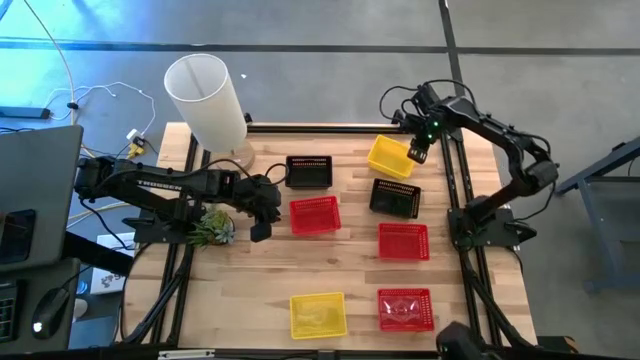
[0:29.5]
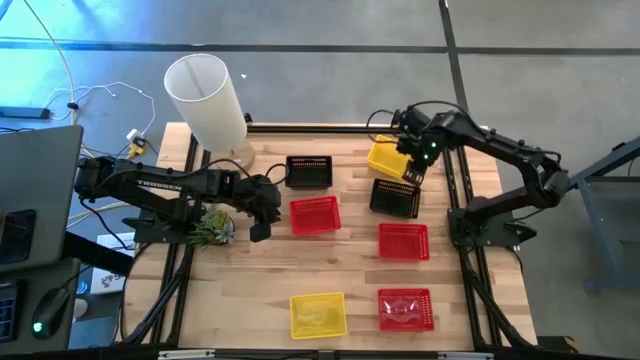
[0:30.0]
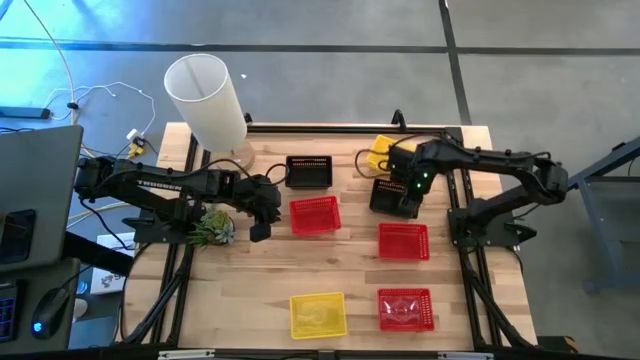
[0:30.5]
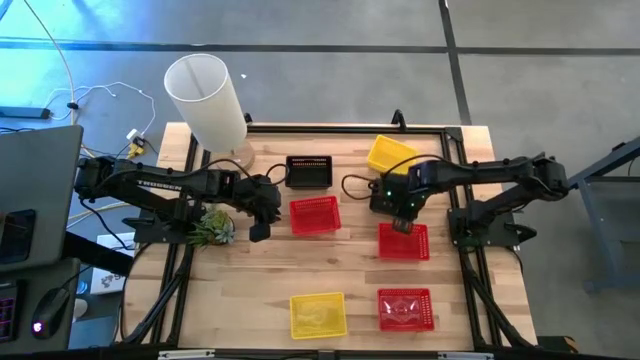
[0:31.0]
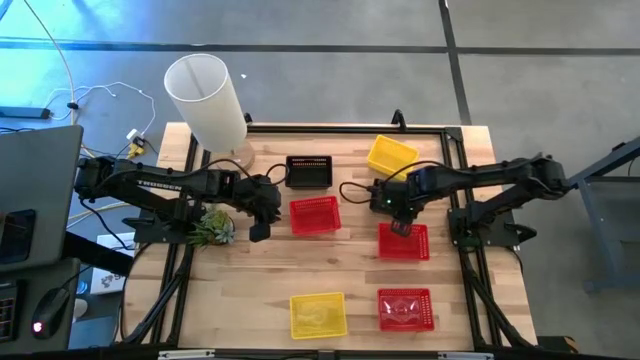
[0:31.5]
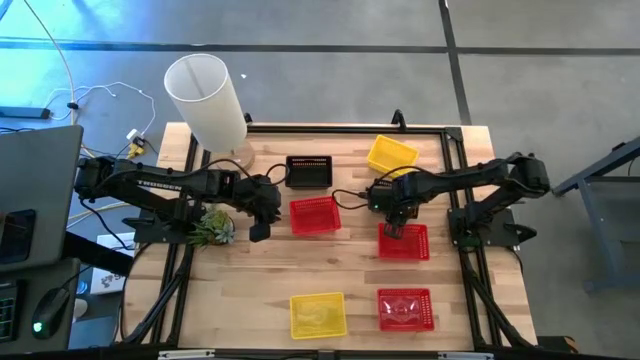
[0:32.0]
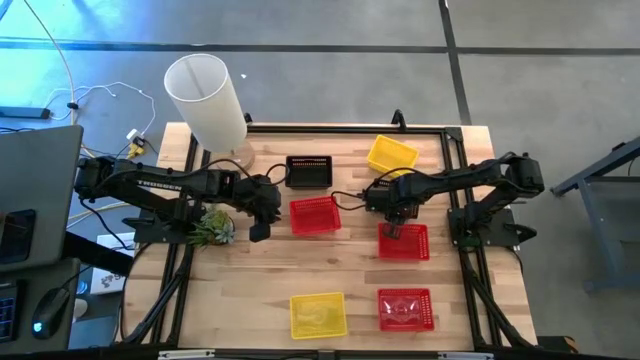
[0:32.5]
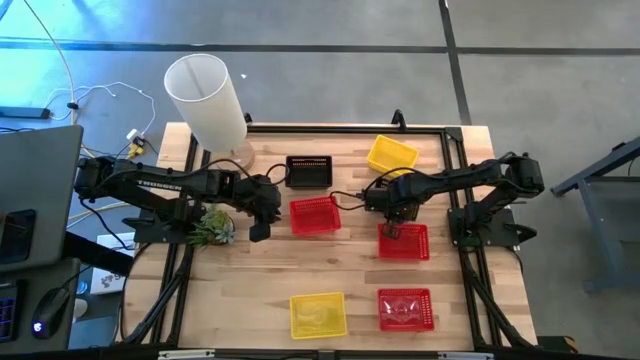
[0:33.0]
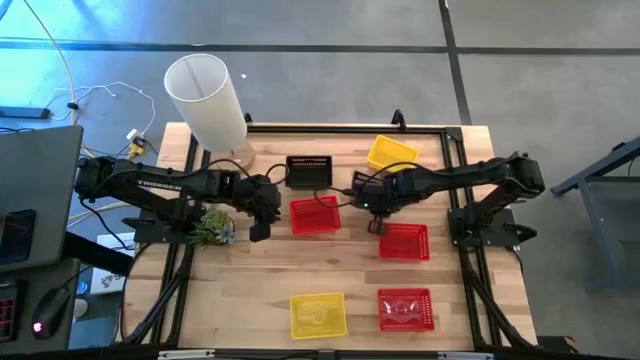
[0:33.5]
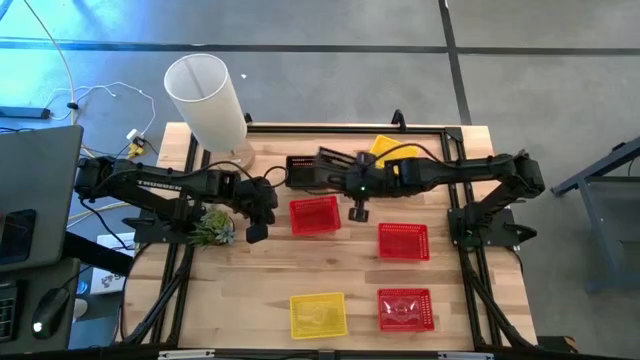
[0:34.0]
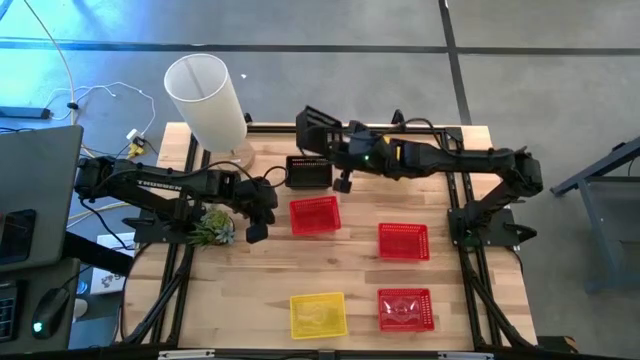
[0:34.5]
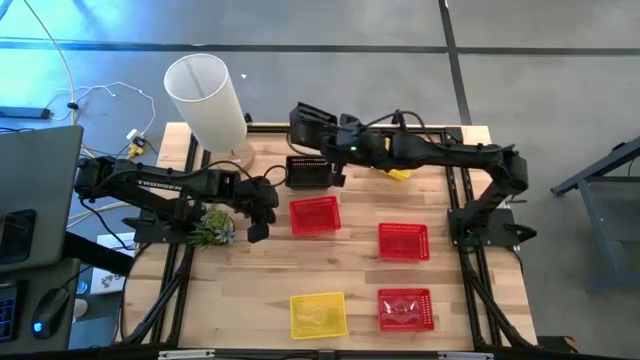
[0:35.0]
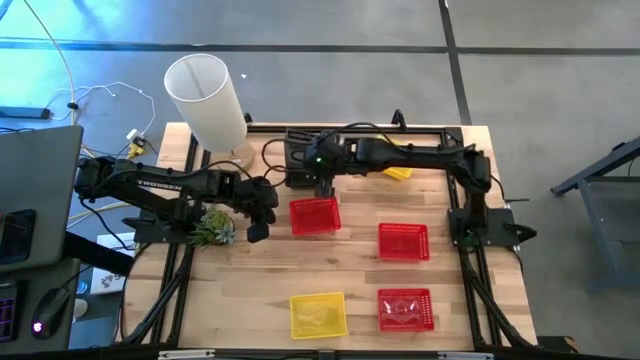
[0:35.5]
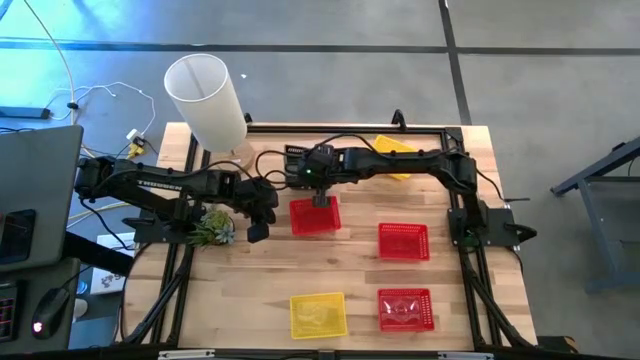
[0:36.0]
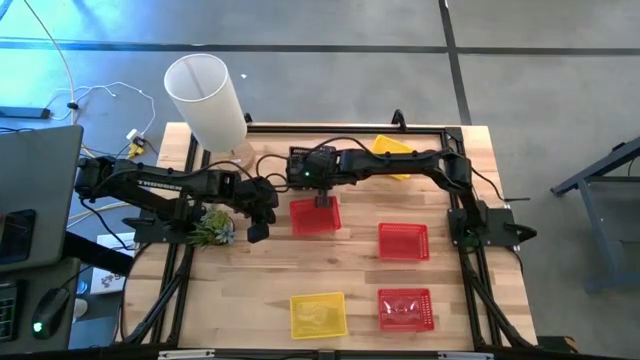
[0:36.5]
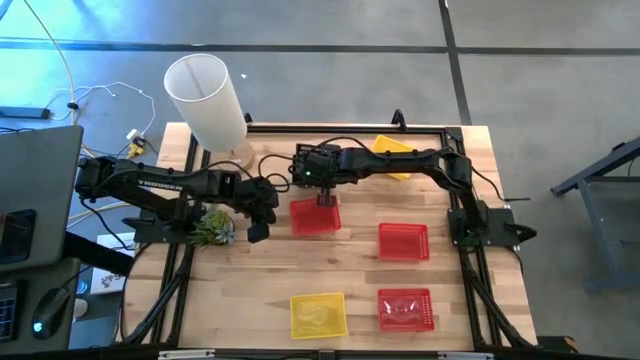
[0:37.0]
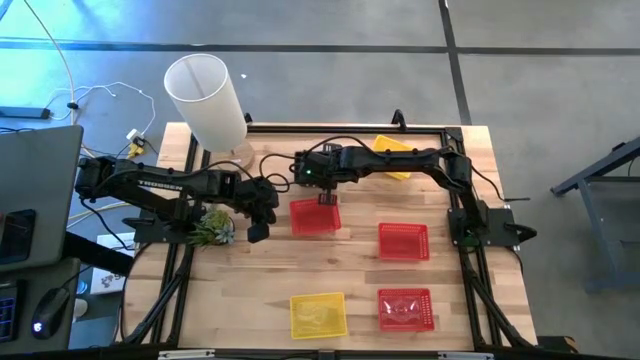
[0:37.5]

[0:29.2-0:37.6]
Stack the bottom black bin on top of the top black bin

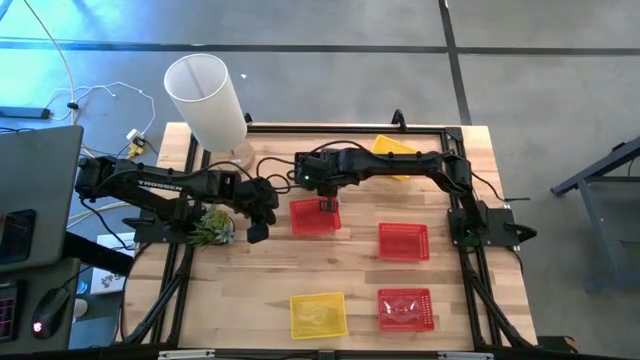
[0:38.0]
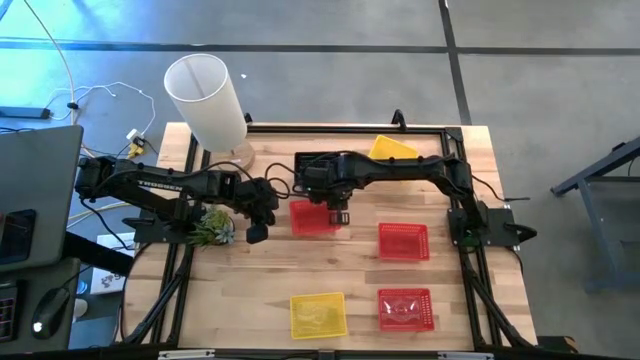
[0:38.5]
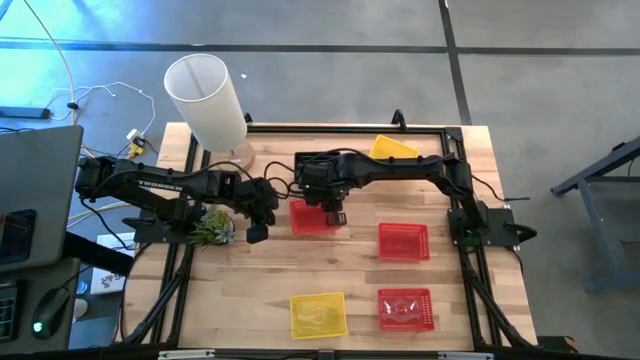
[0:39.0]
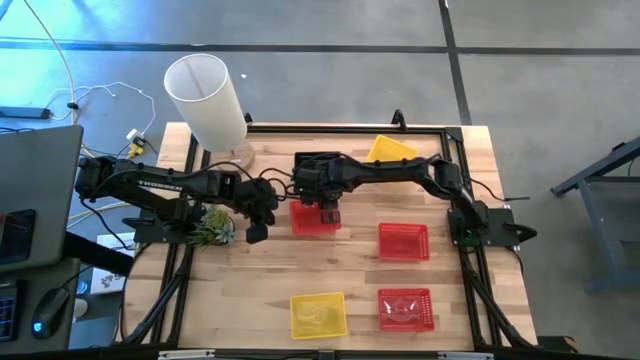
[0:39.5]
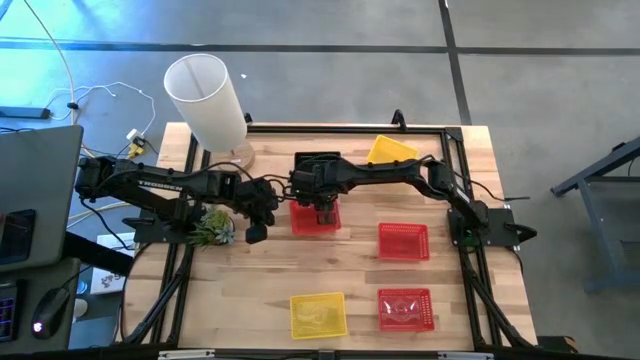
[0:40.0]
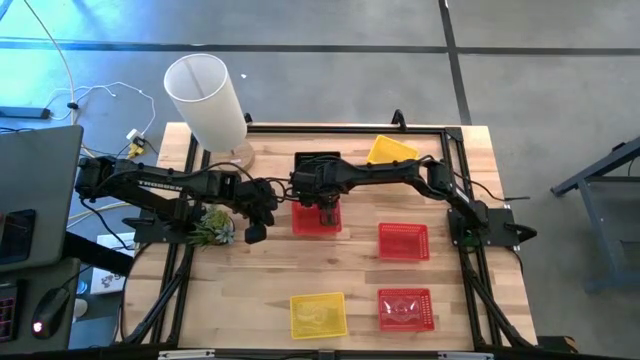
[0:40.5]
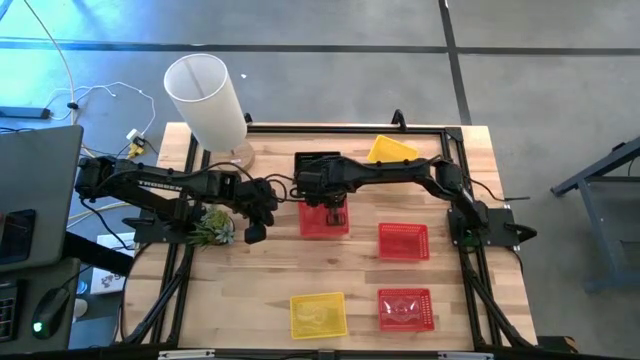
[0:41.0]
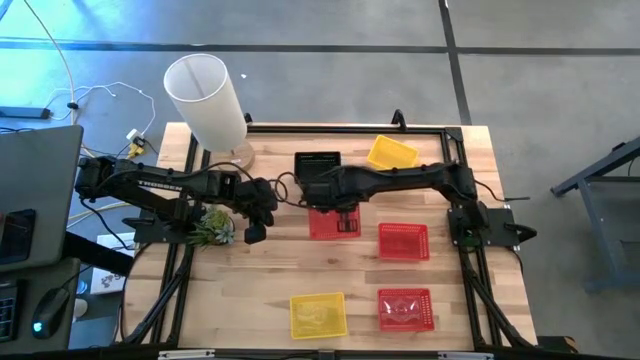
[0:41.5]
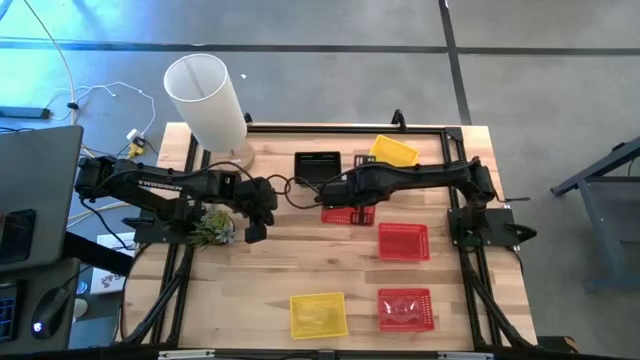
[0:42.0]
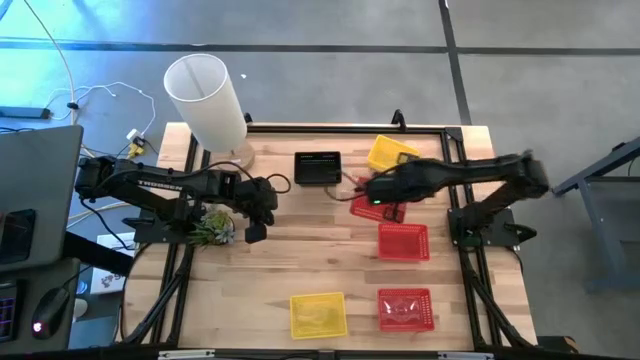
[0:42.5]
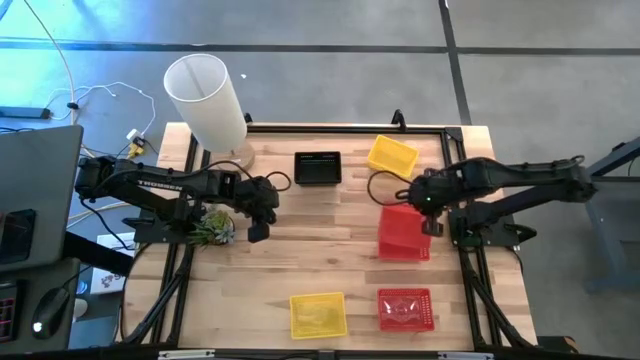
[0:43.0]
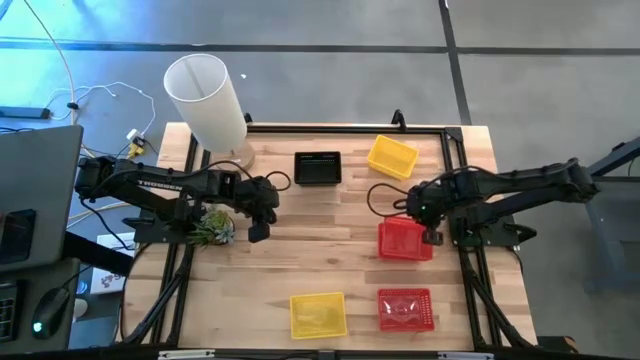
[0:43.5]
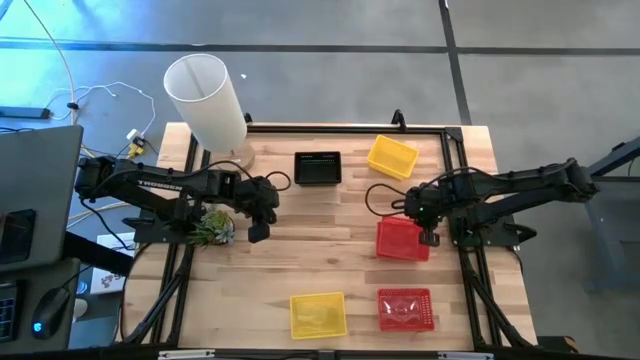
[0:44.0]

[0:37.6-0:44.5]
Stack the top left red bin on top of the top right red bin

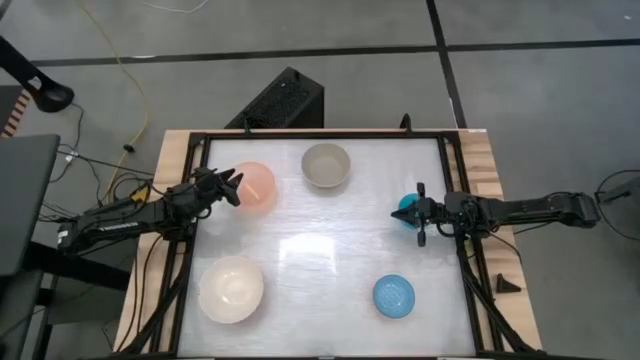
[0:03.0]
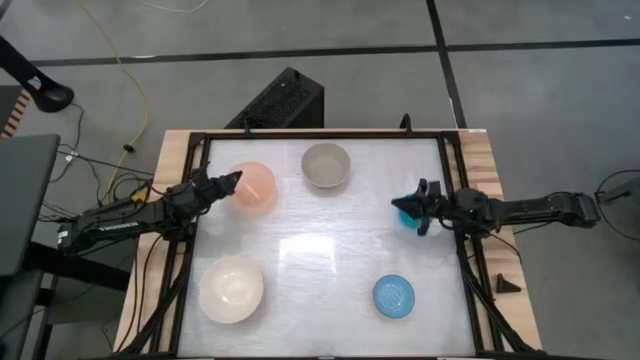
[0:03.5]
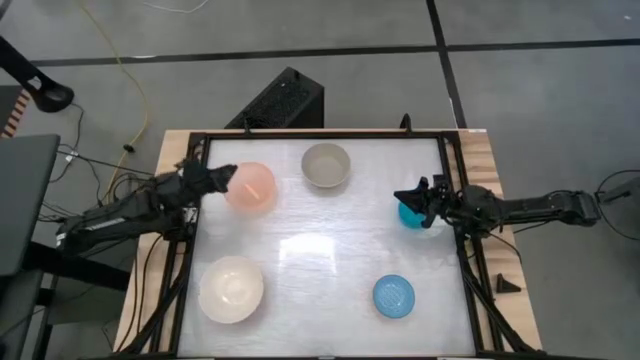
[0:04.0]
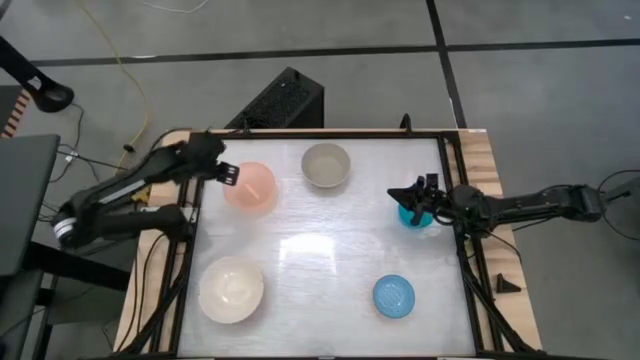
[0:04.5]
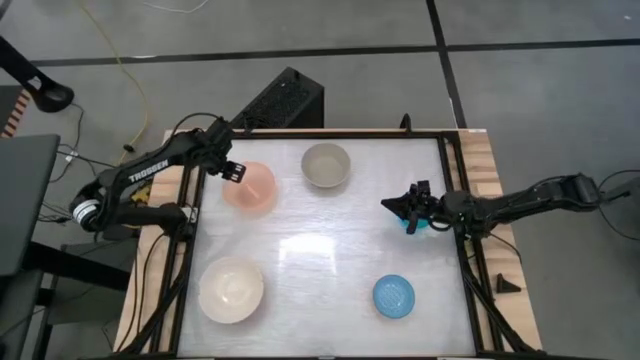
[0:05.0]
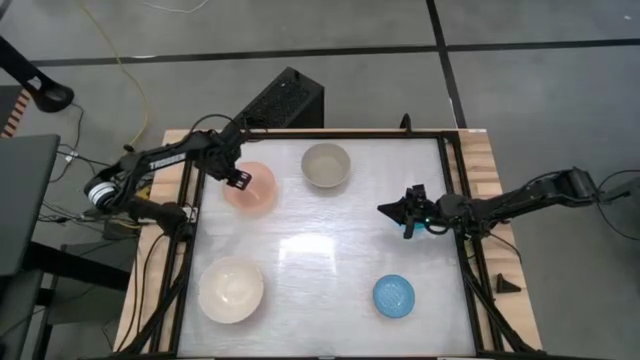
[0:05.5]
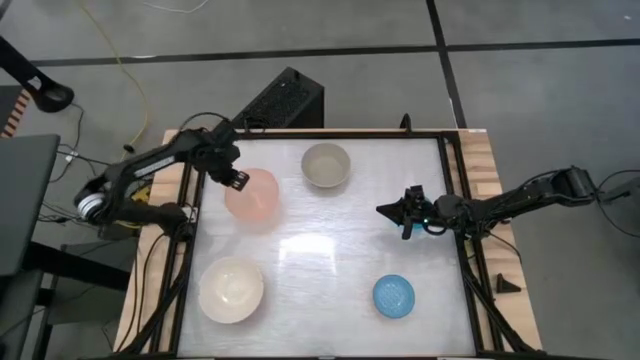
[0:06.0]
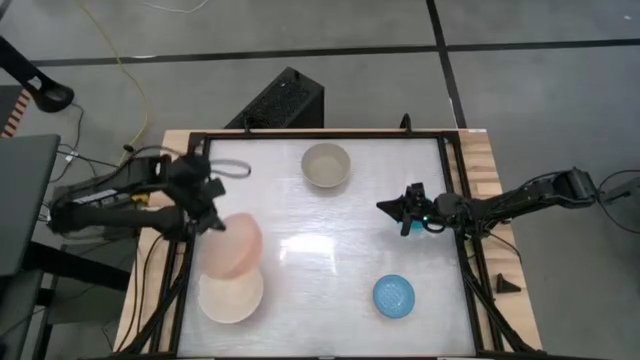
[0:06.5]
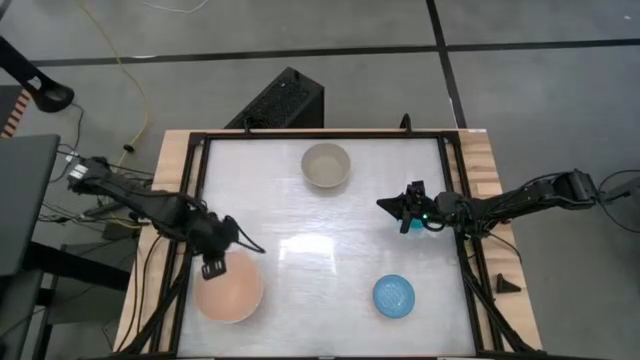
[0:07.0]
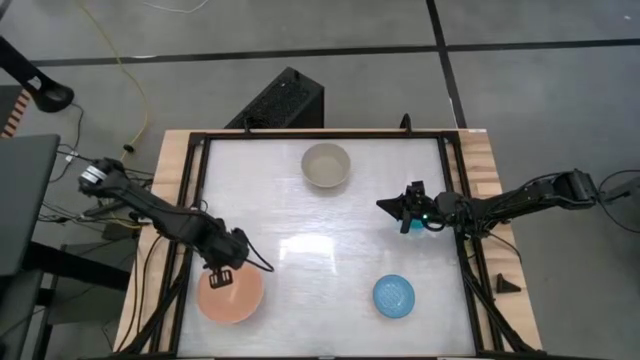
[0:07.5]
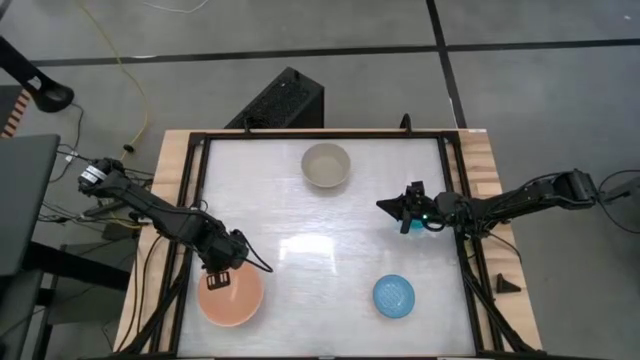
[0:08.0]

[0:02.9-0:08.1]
Stack the orange bowl on top of the white bowl
